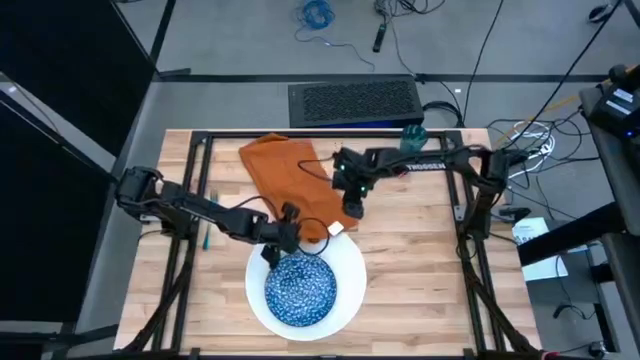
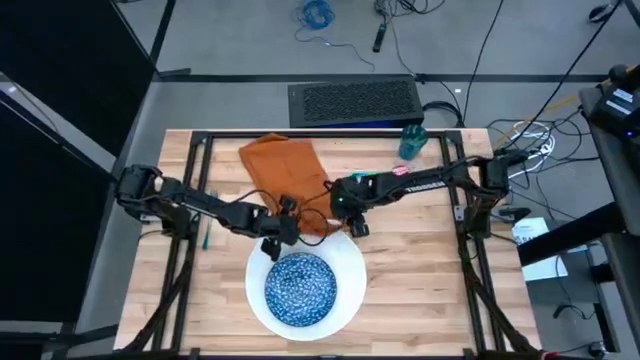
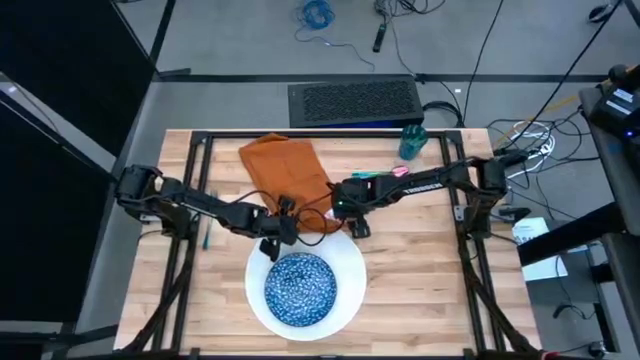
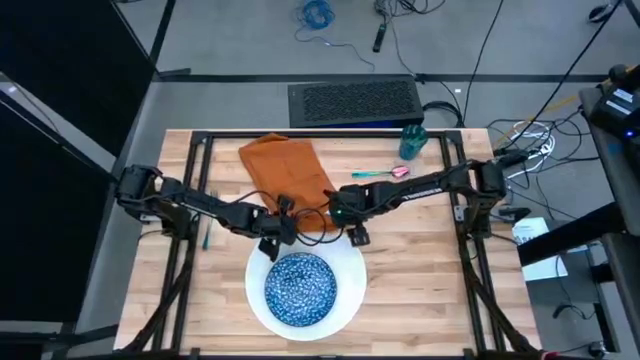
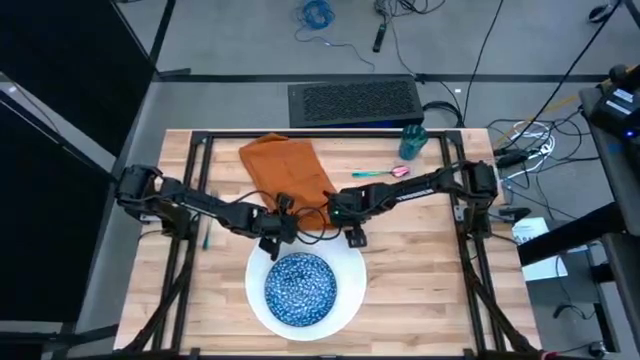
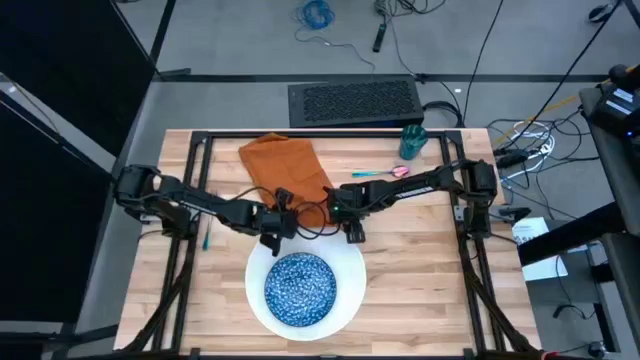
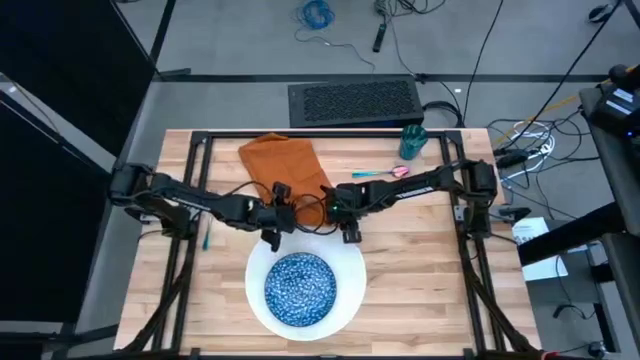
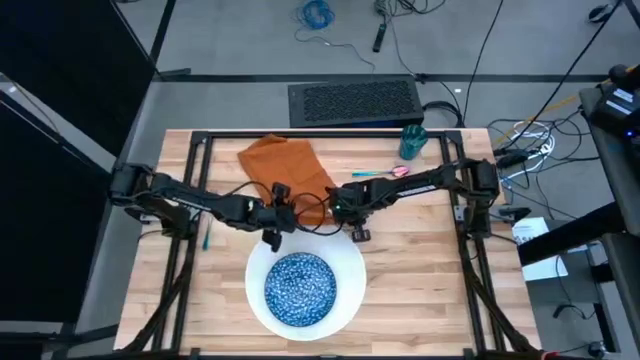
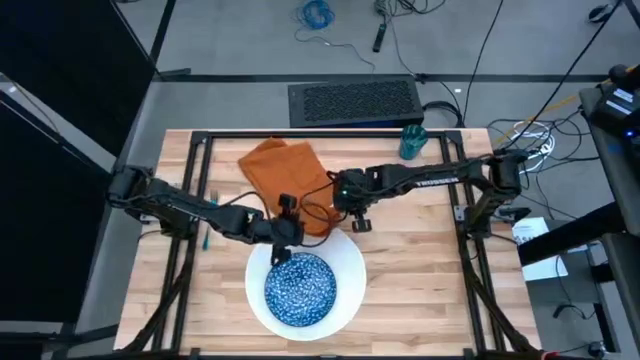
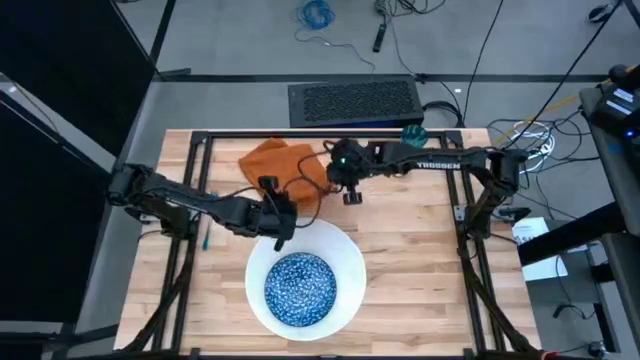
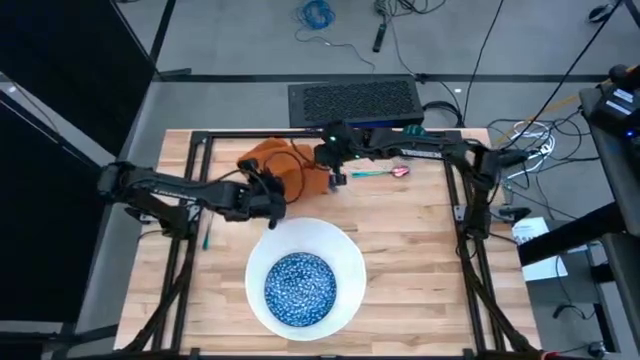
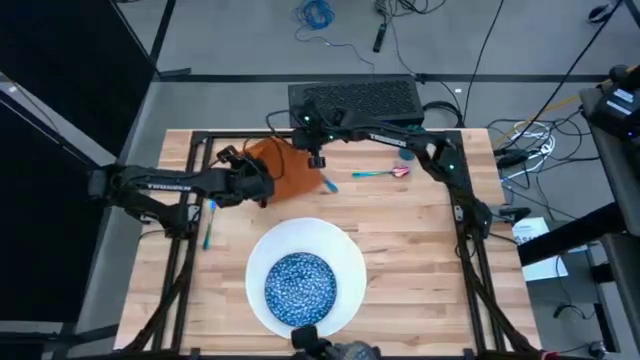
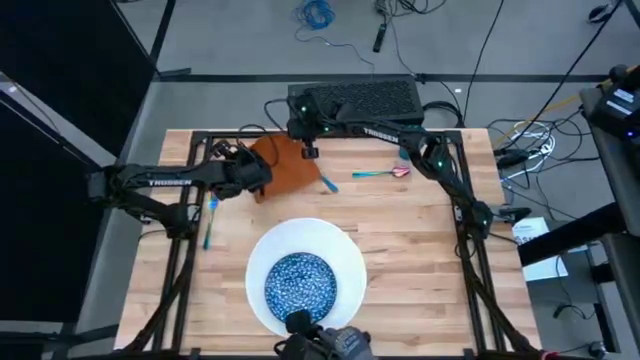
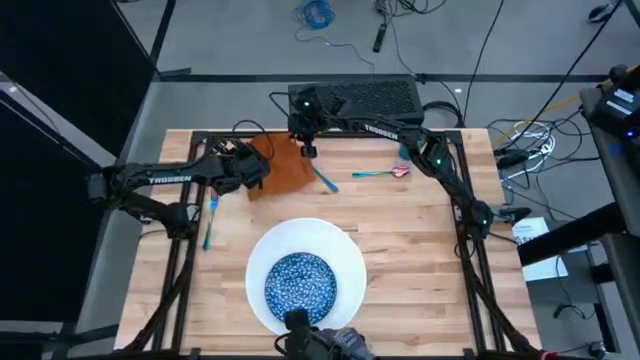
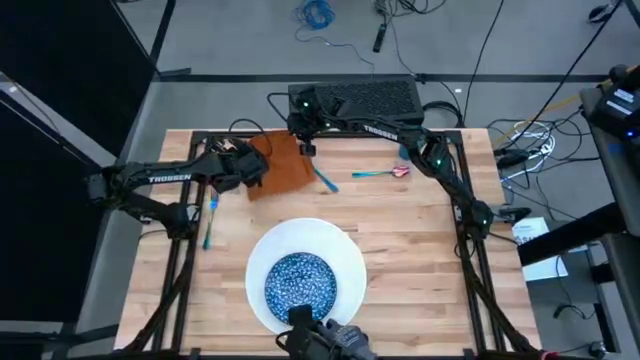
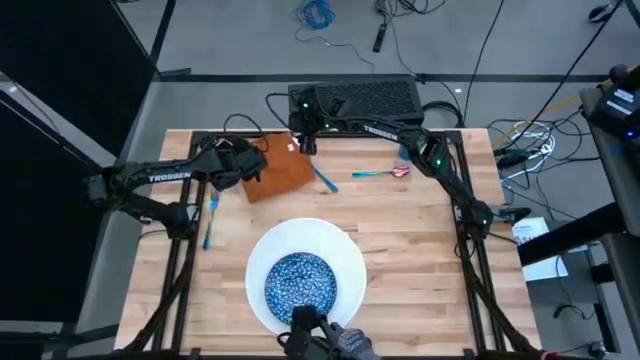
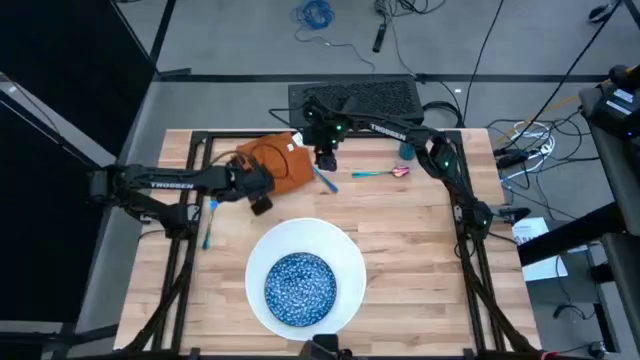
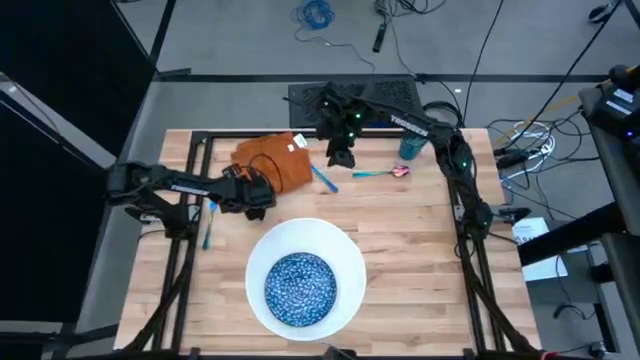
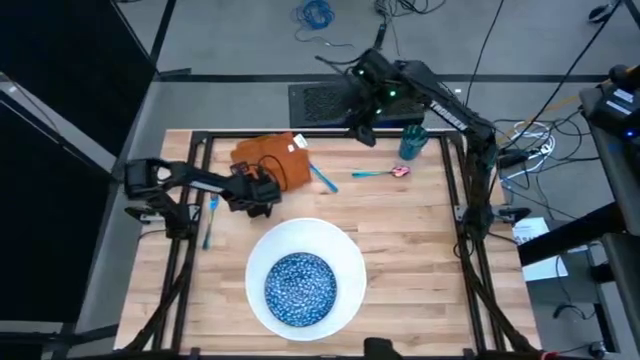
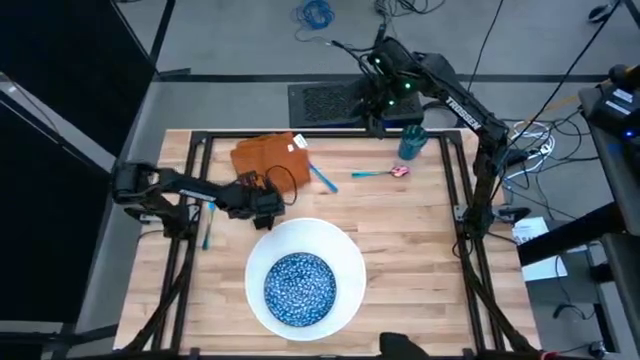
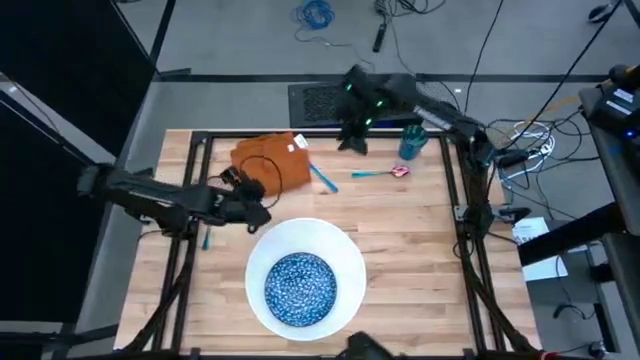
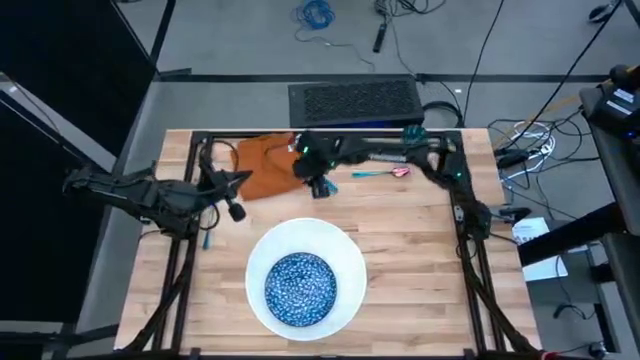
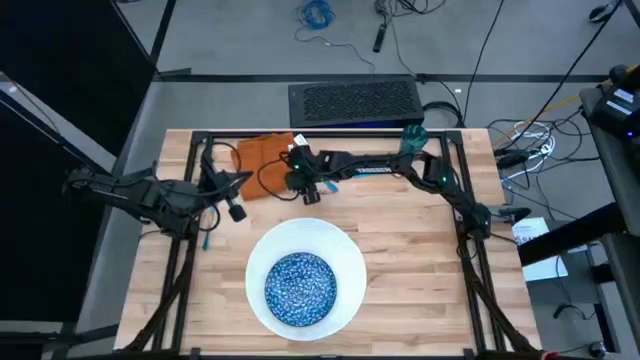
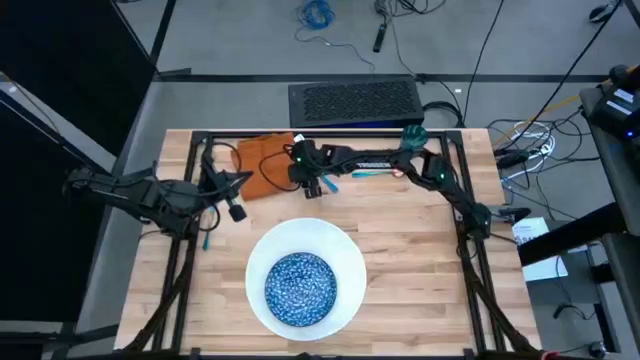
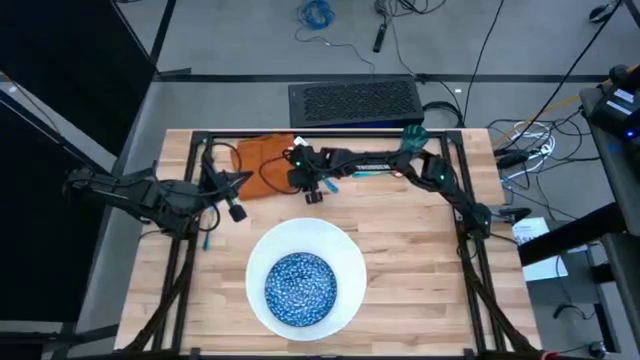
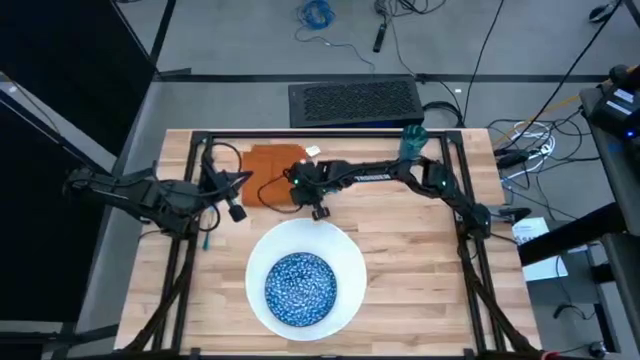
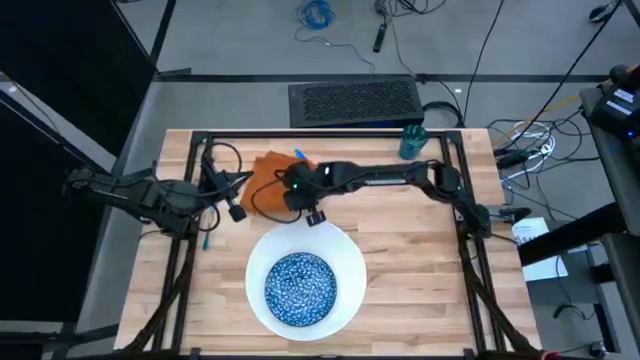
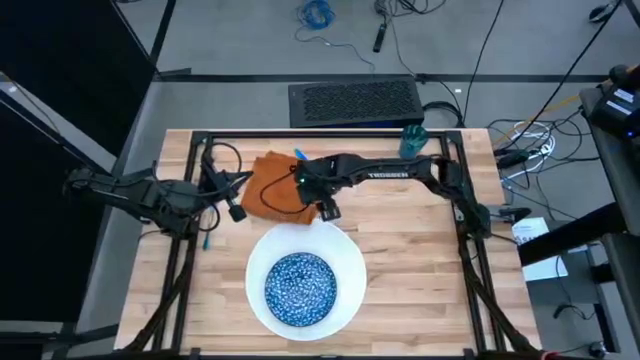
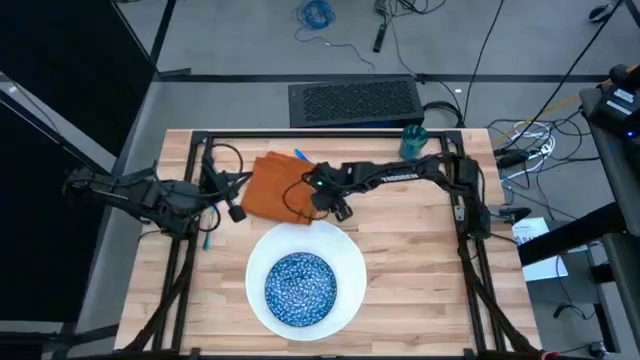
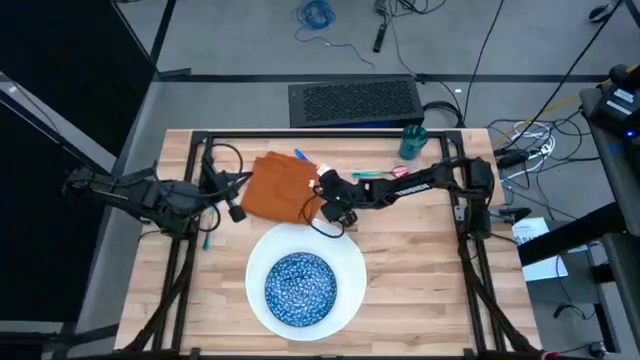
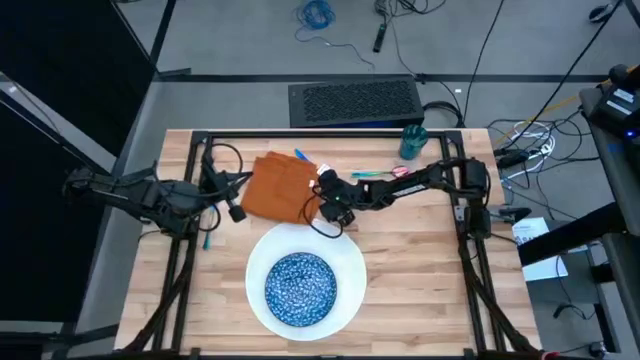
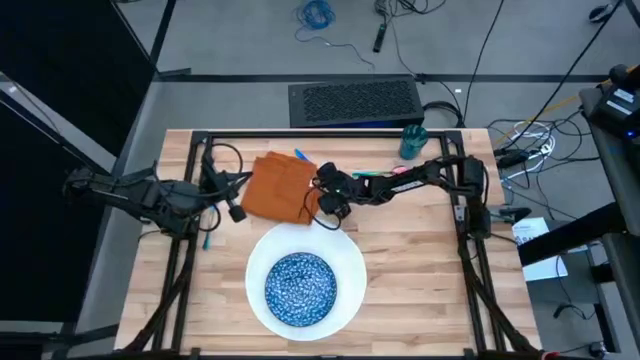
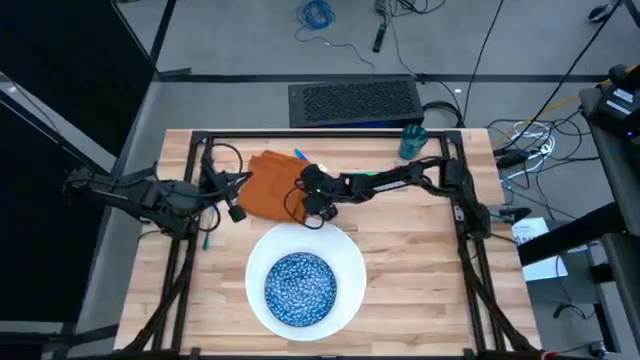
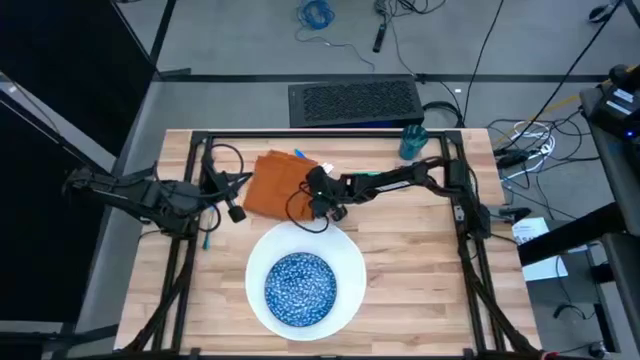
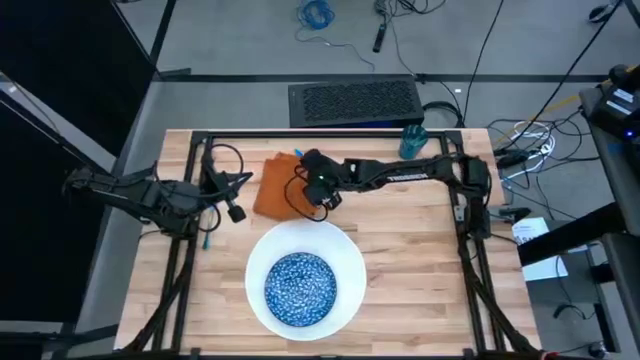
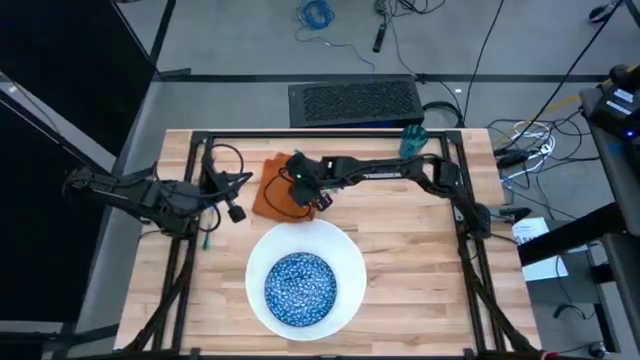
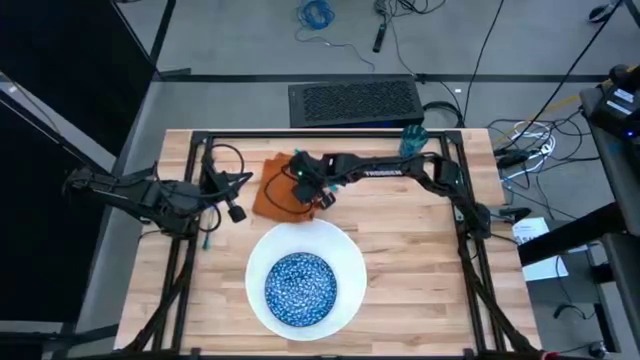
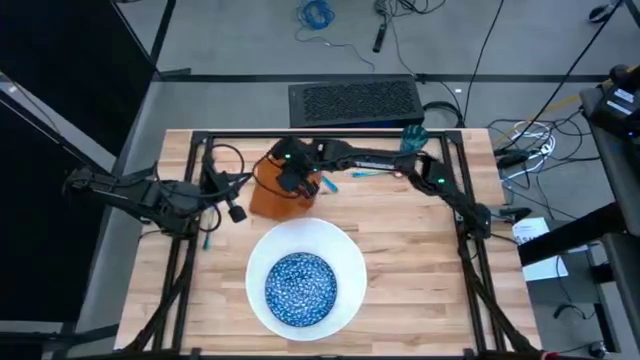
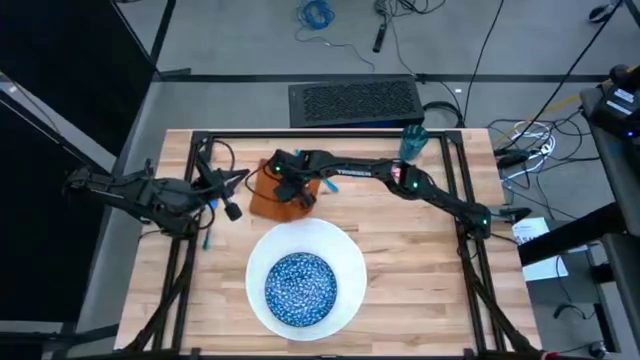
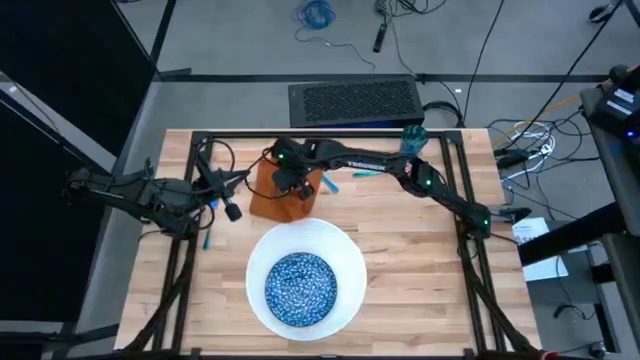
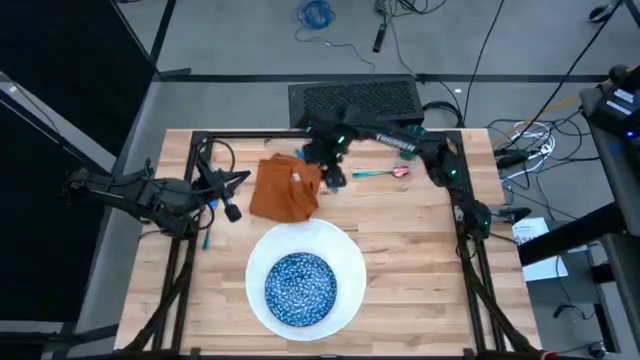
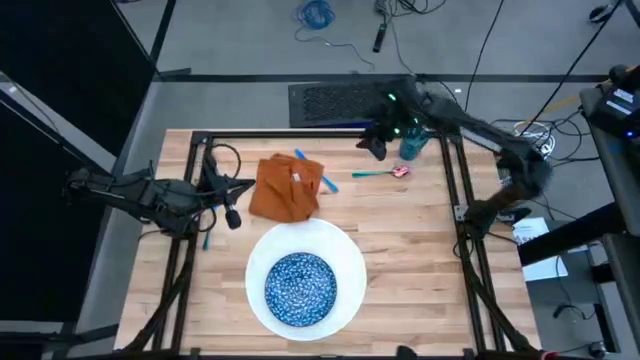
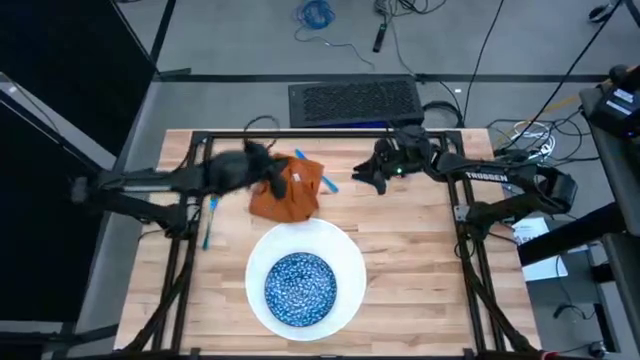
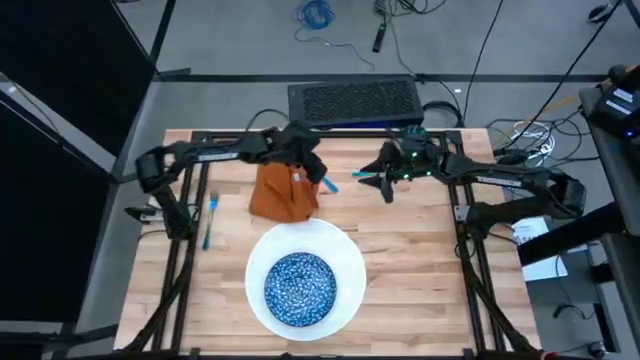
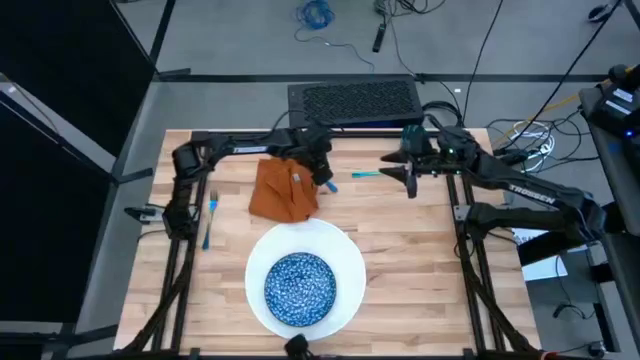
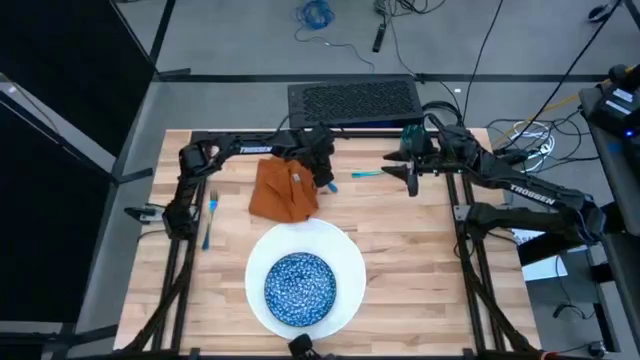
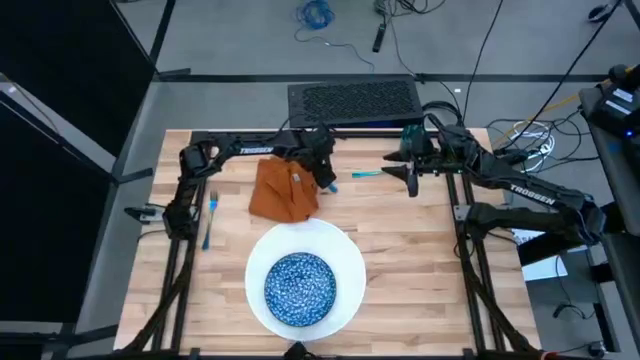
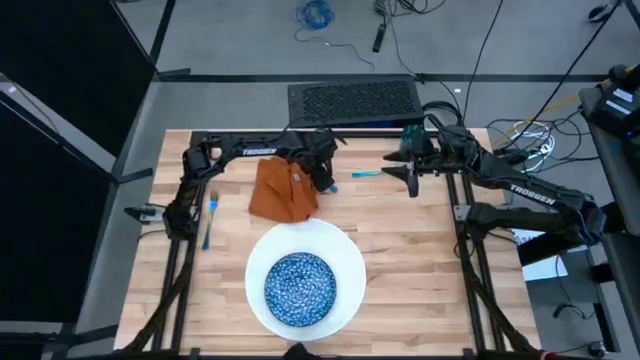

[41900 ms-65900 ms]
Task: Set table place
Fold the orange table napkin
